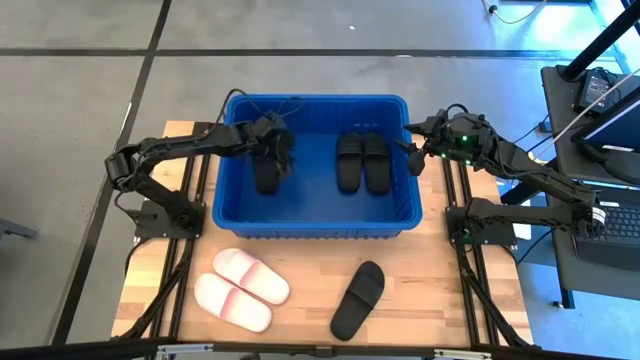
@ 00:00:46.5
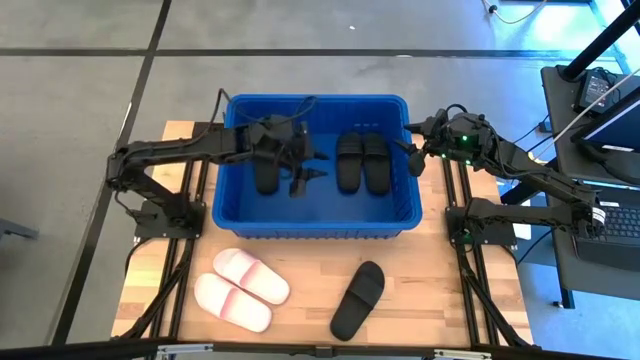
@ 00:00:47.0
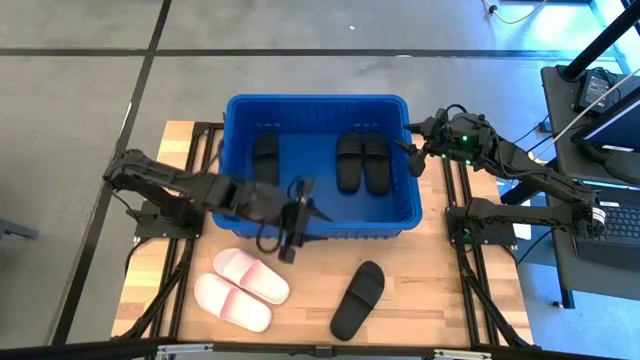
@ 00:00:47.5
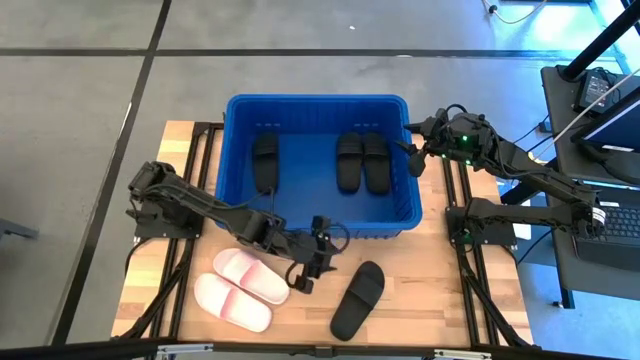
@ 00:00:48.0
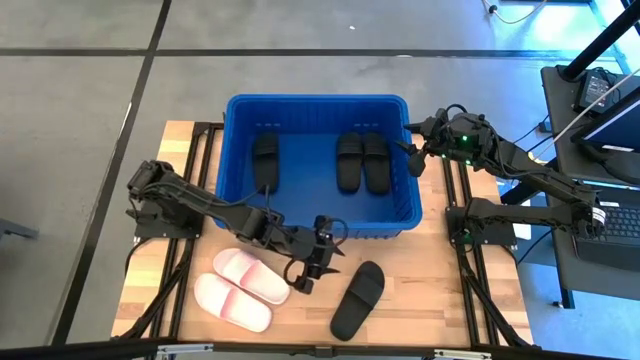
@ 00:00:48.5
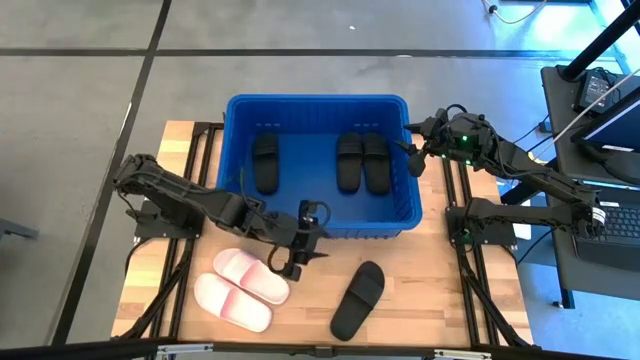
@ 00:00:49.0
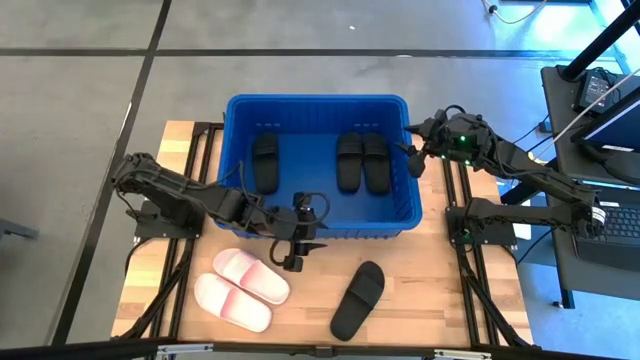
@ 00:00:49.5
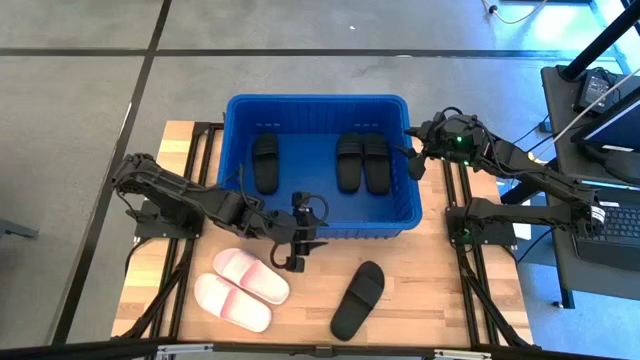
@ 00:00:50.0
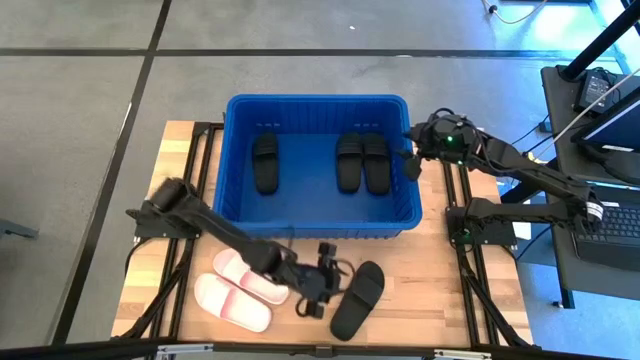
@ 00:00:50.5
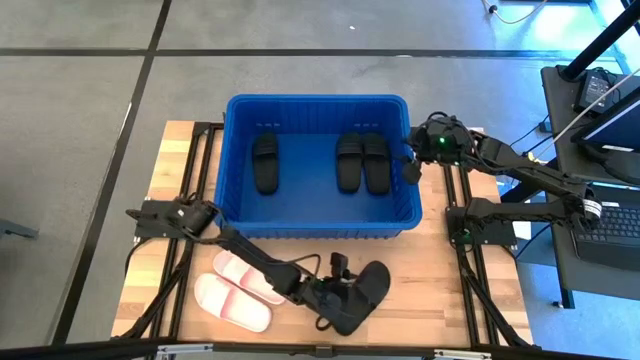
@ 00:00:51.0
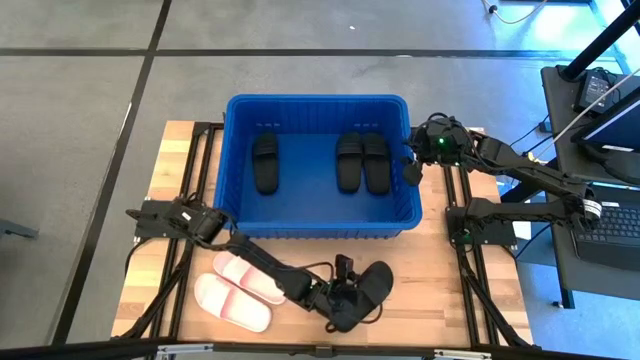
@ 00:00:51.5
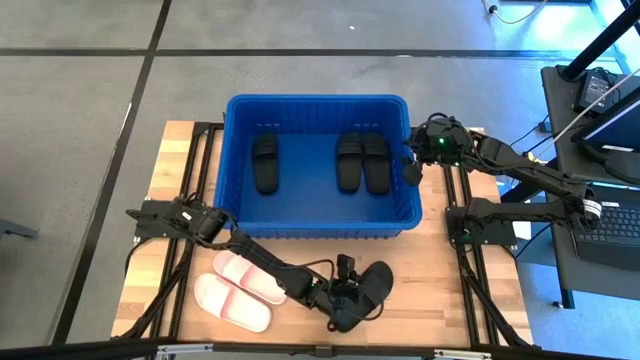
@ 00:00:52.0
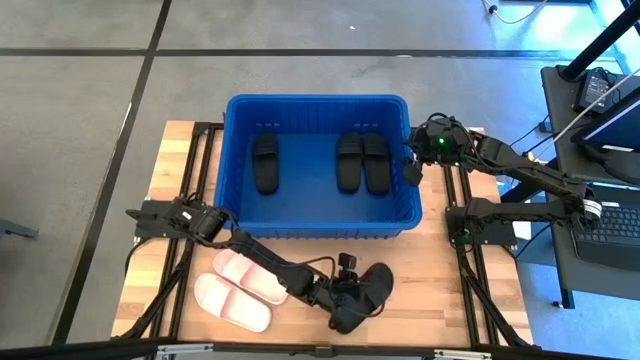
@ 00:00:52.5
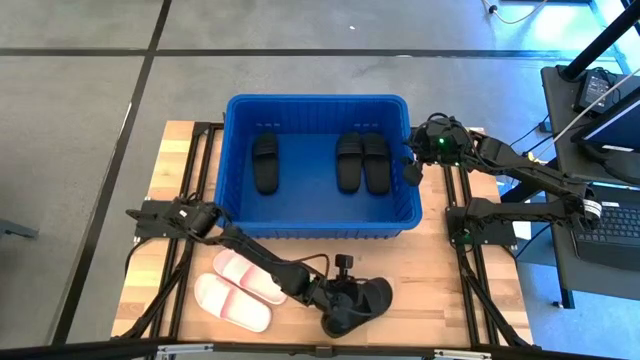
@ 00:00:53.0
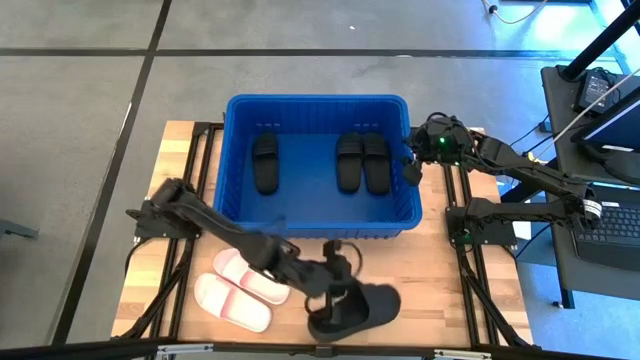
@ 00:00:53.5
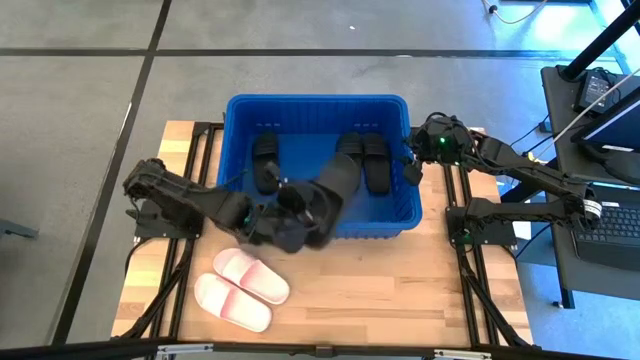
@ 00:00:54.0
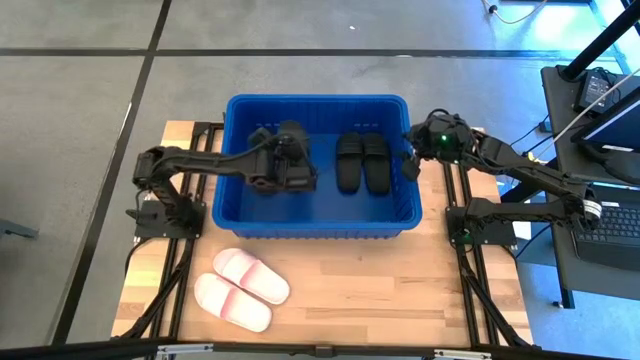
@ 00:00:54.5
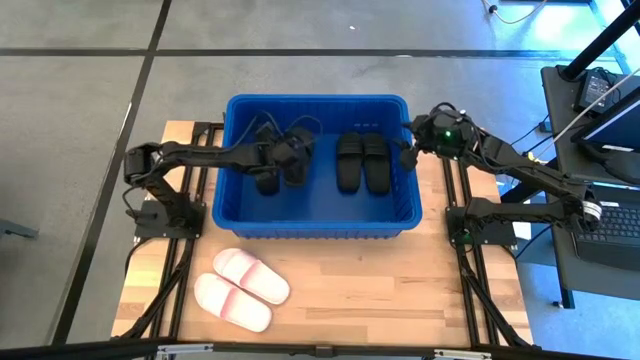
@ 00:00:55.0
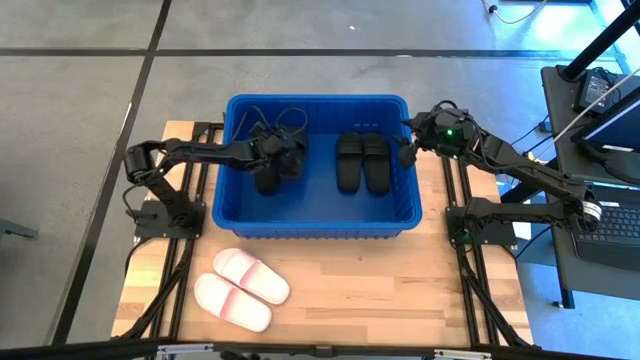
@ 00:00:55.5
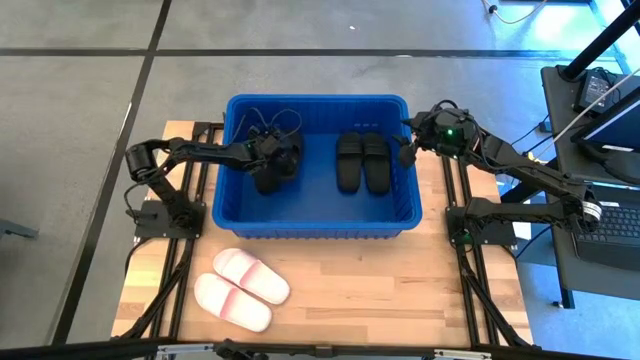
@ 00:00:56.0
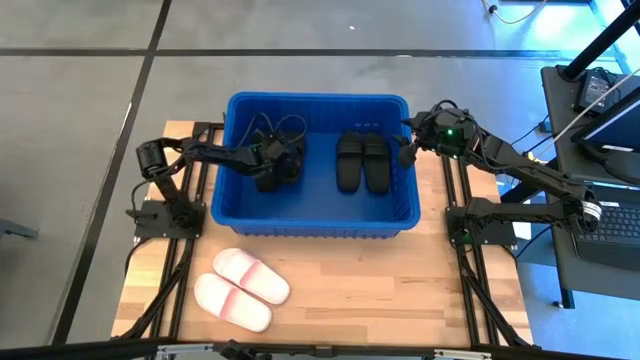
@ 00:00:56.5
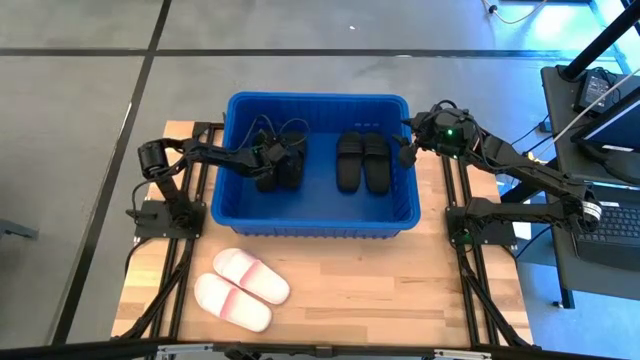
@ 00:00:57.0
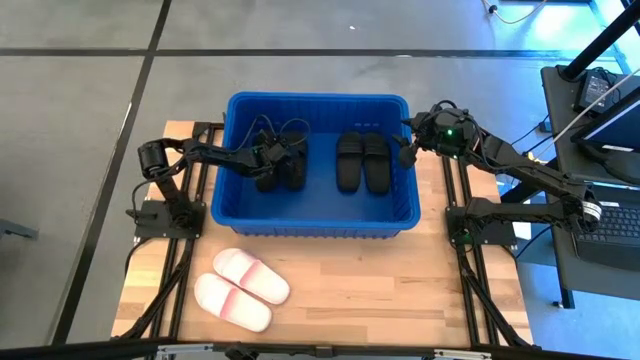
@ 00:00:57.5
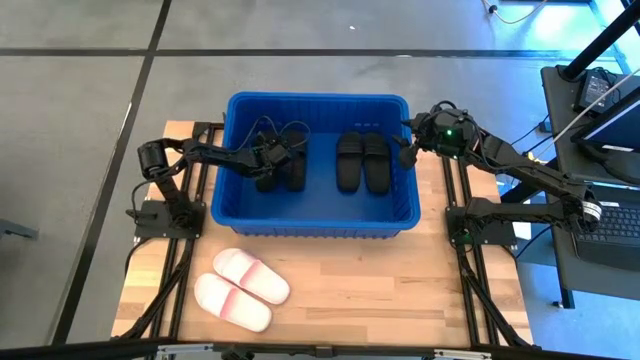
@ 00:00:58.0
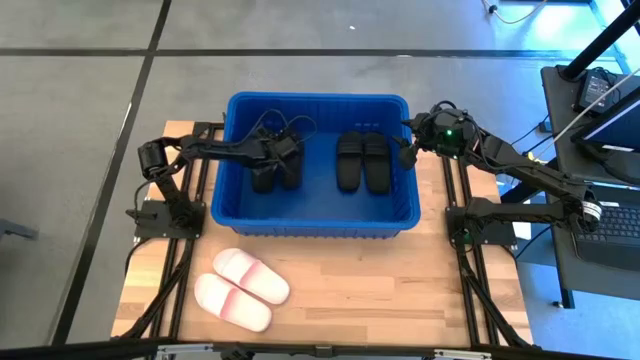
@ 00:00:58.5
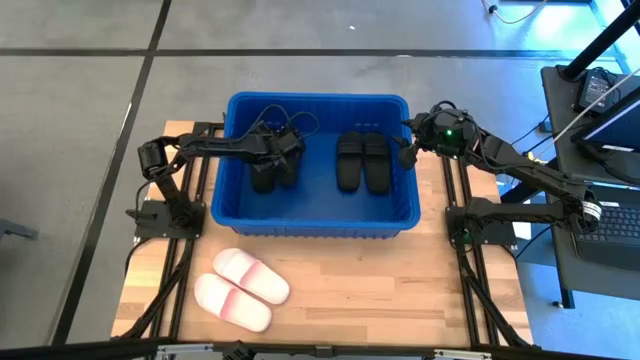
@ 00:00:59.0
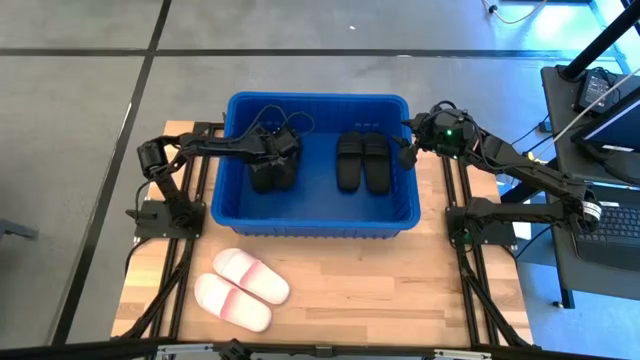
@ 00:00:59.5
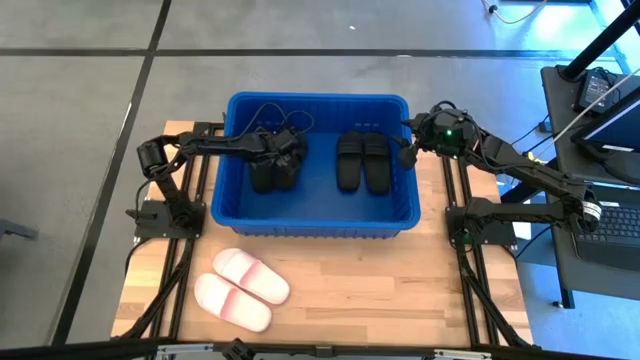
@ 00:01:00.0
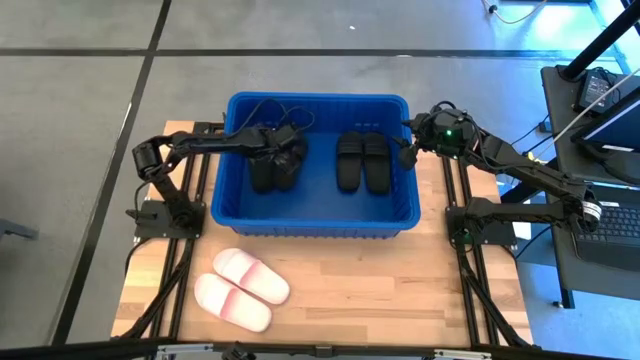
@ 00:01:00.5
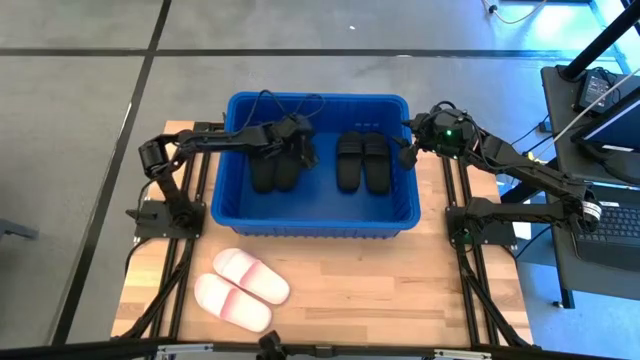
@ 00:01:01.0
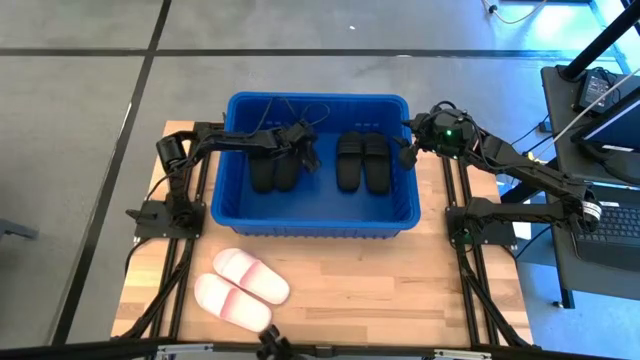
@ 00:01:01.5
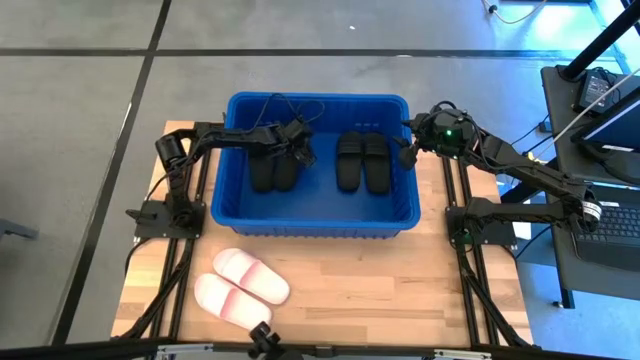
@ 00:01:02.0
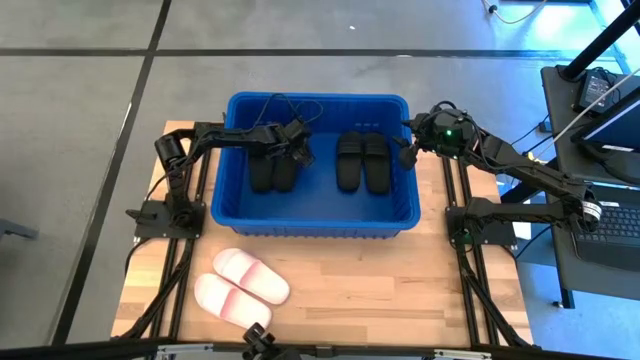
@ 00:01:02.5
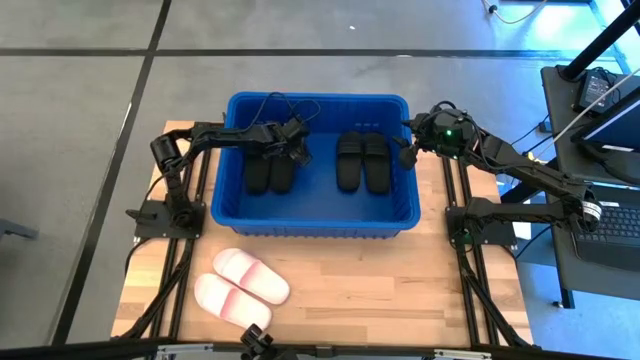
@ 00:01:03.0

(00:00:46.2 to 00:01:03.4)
Task: Pick and place slides into bin
Put the black slide into the organizer bin

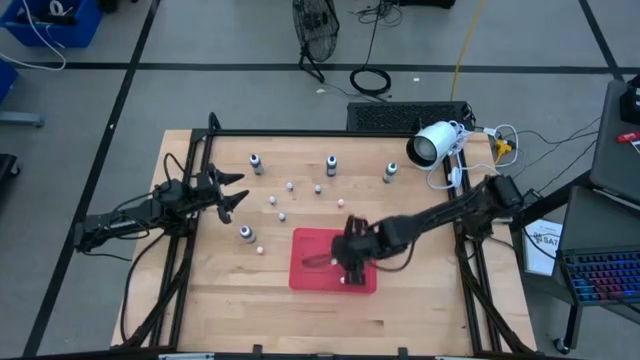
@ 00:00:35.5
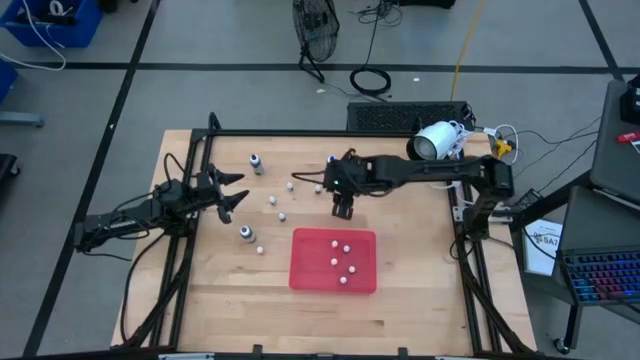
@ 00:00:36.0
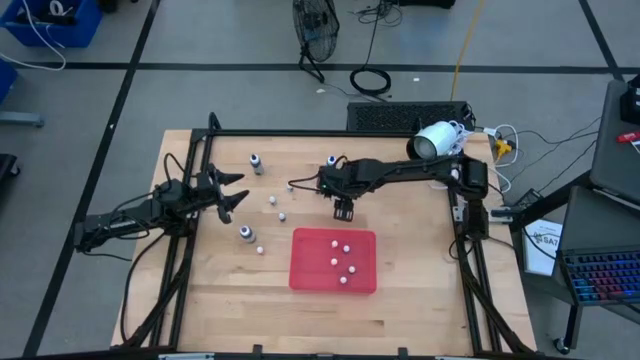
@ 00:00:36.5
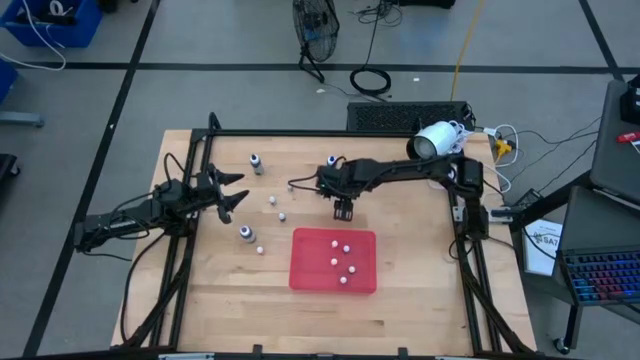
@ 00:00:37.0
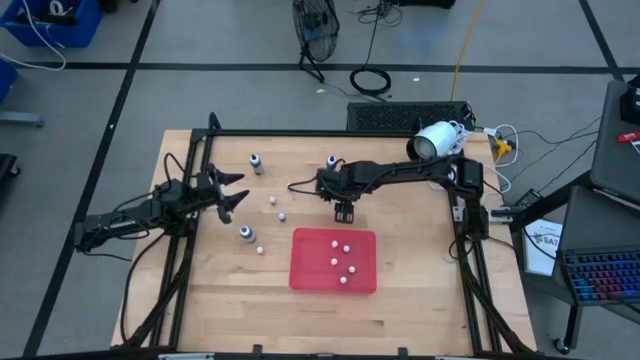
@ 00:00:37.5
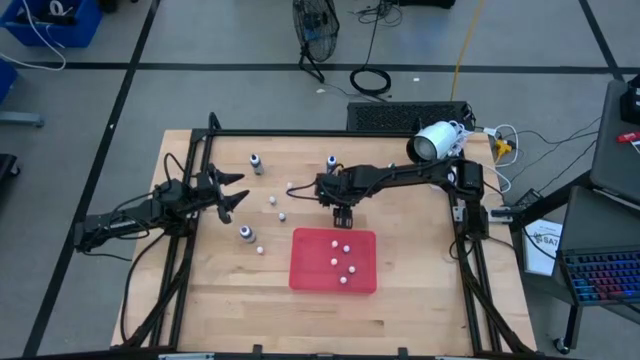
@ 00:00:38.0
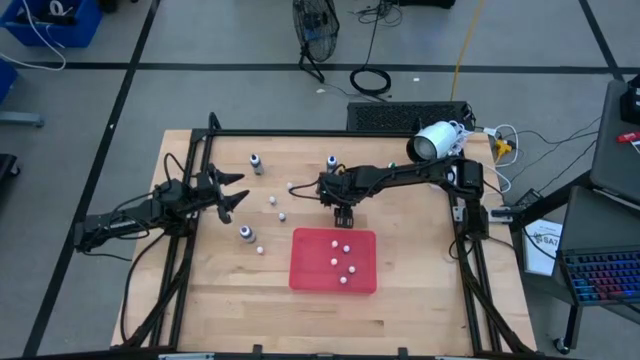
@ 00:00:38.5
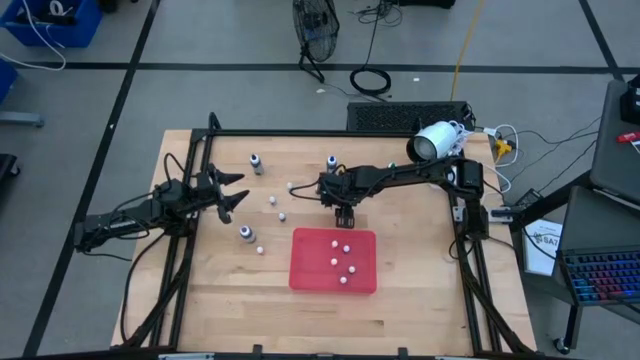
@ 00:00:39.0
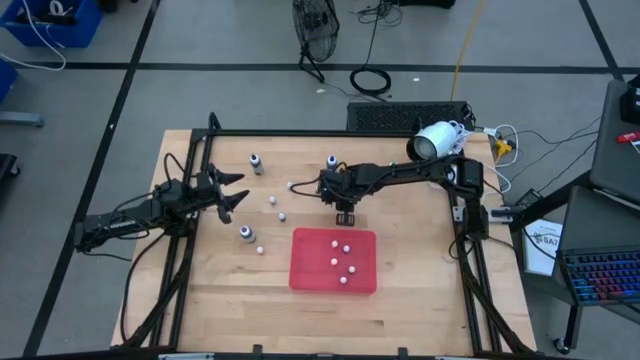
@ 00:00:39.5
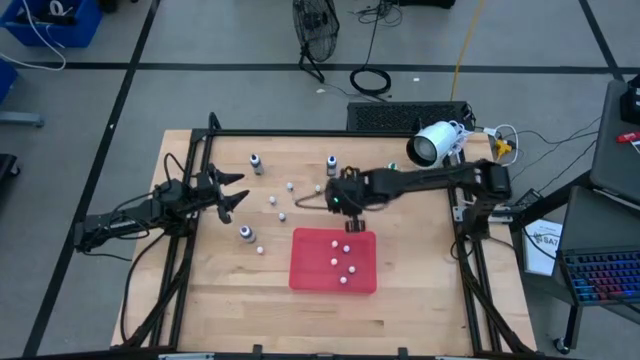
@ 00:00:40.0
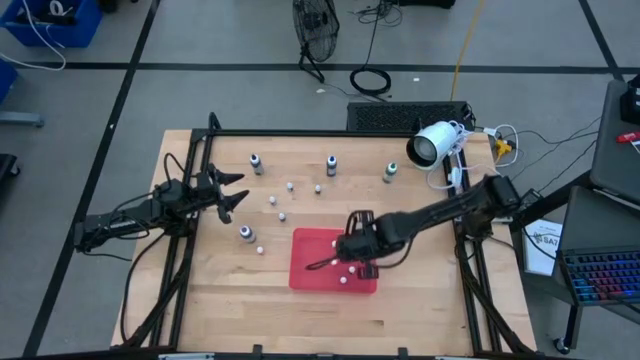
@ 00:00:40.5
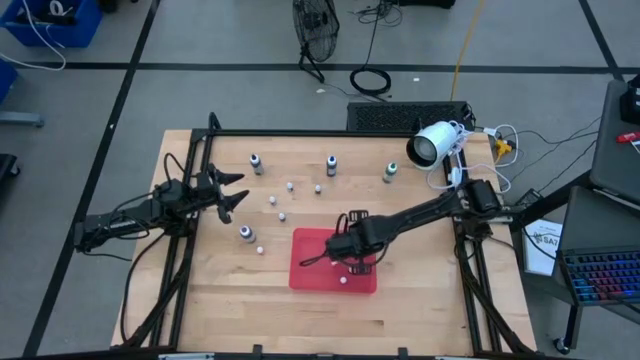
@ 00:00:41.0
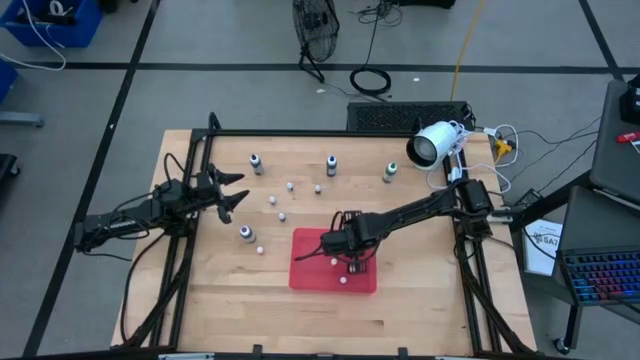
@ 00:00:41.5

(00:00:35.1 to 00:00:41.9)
Task: Pick & Place food coloring
Put the small orange food coloring bottle into the red bin
